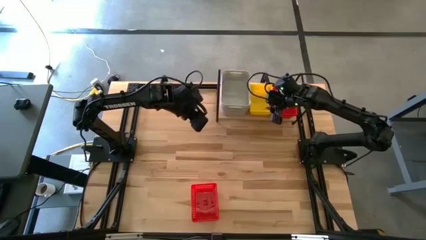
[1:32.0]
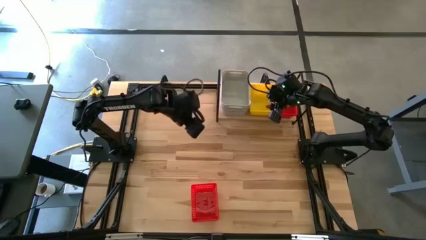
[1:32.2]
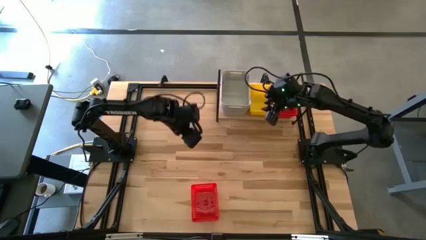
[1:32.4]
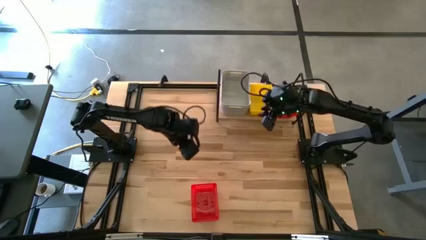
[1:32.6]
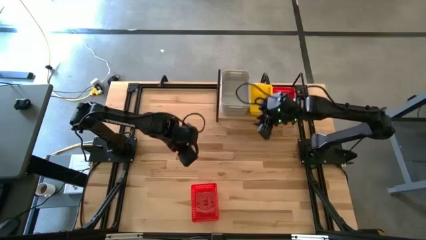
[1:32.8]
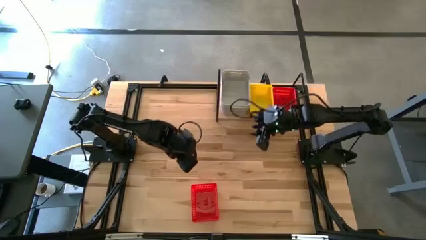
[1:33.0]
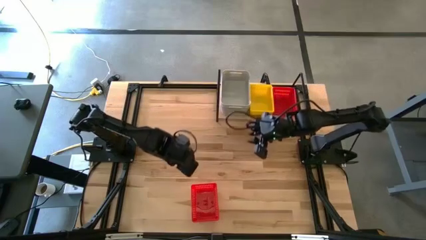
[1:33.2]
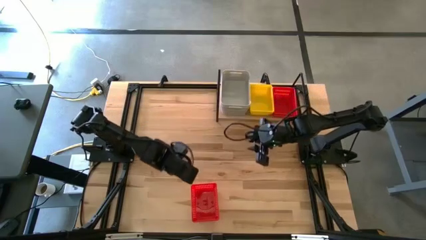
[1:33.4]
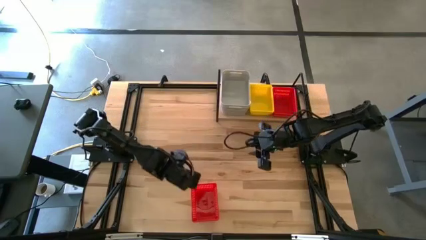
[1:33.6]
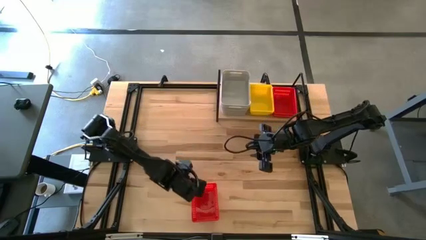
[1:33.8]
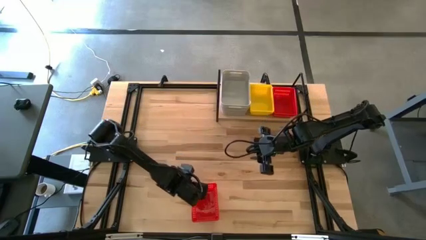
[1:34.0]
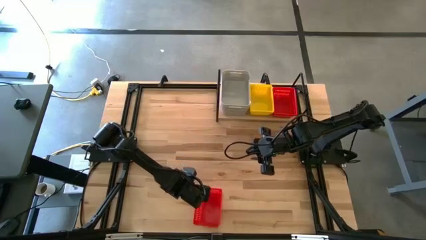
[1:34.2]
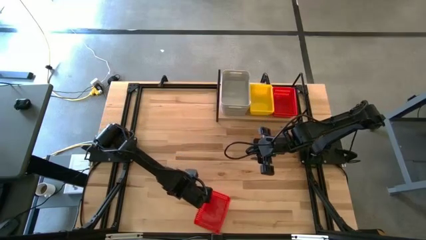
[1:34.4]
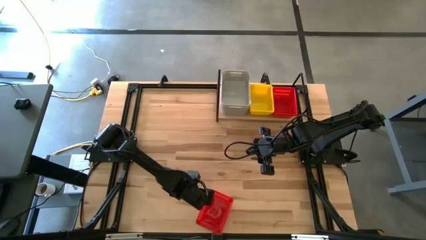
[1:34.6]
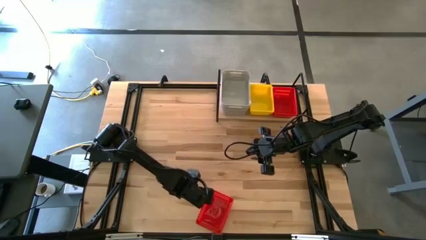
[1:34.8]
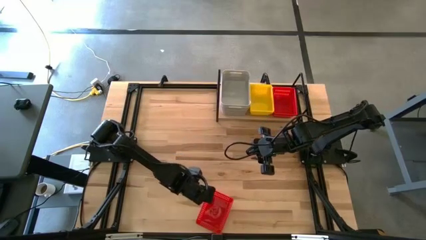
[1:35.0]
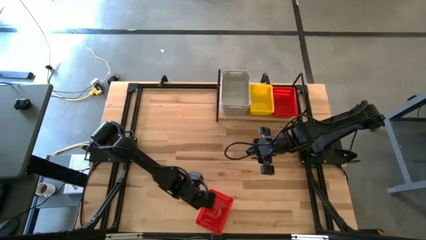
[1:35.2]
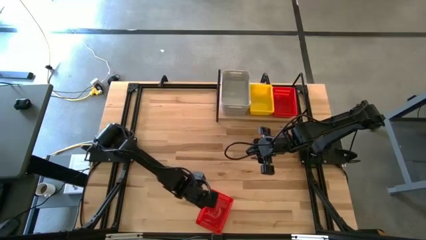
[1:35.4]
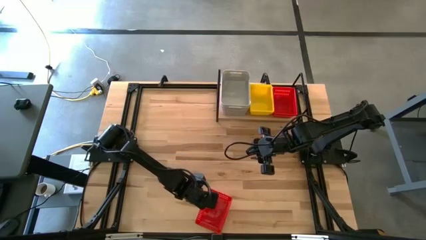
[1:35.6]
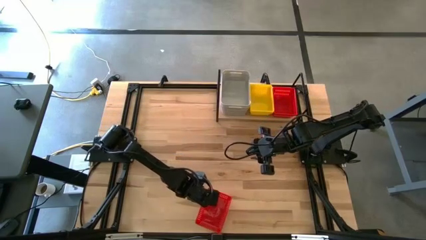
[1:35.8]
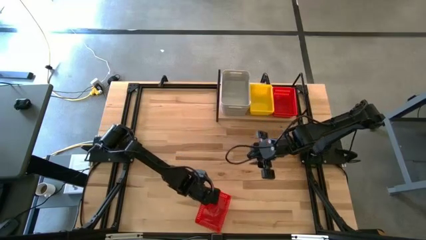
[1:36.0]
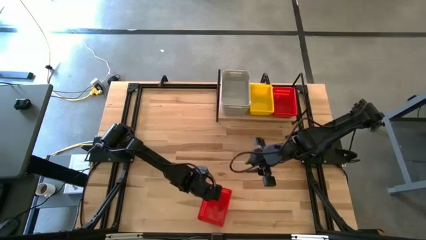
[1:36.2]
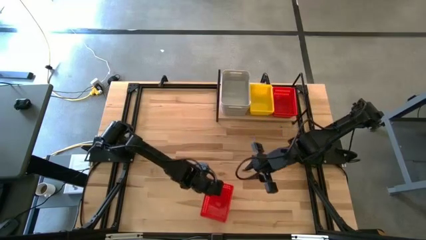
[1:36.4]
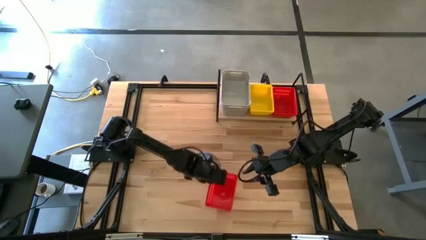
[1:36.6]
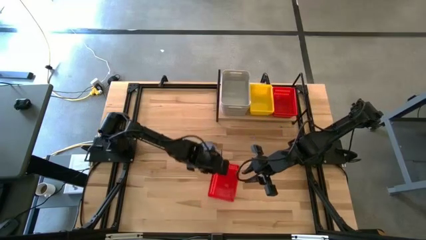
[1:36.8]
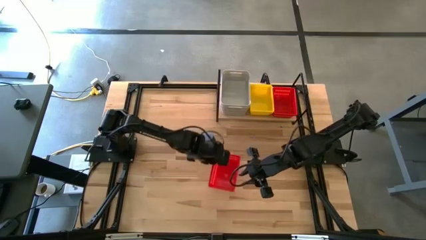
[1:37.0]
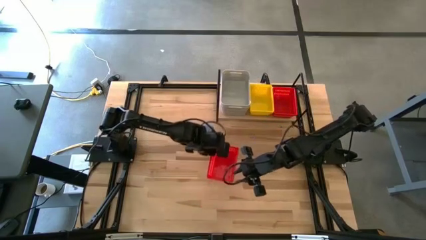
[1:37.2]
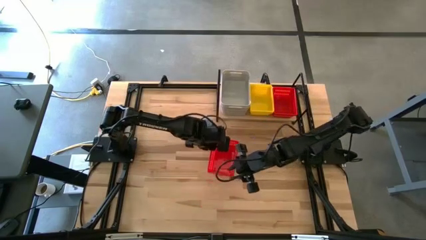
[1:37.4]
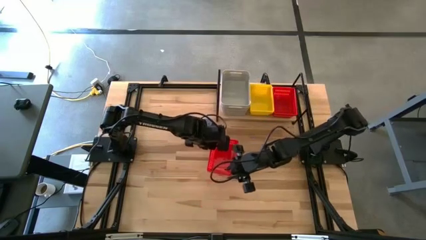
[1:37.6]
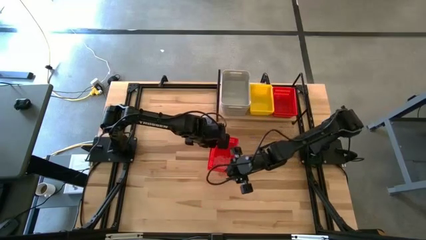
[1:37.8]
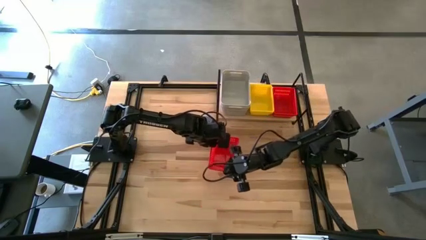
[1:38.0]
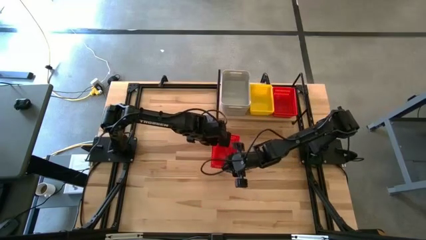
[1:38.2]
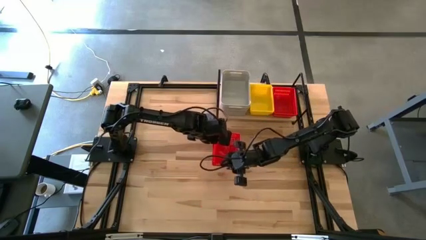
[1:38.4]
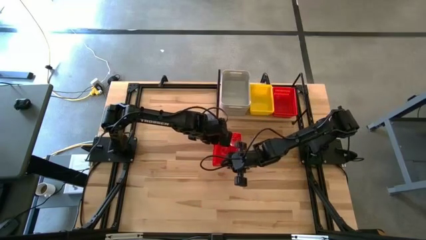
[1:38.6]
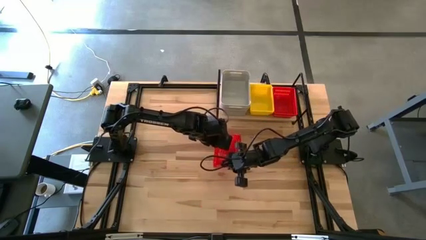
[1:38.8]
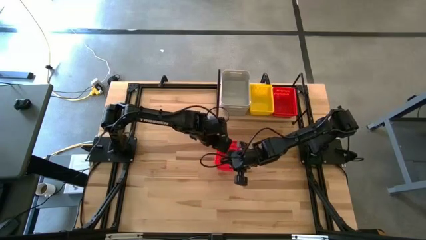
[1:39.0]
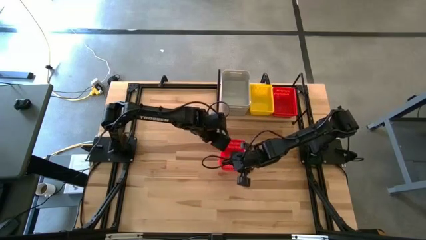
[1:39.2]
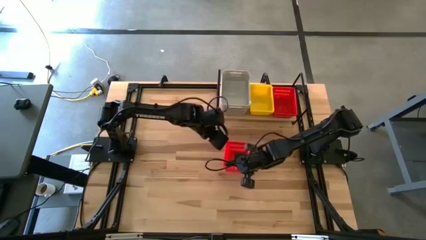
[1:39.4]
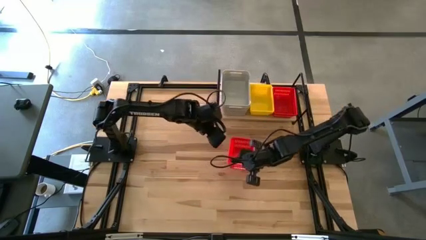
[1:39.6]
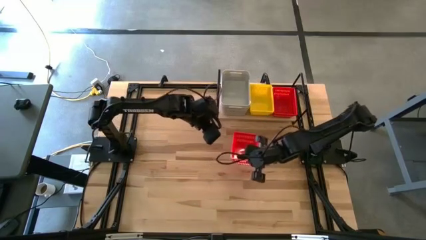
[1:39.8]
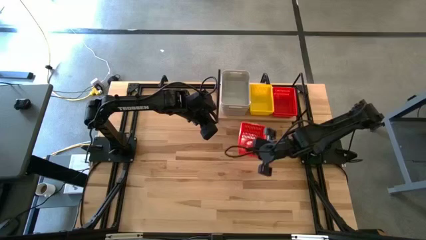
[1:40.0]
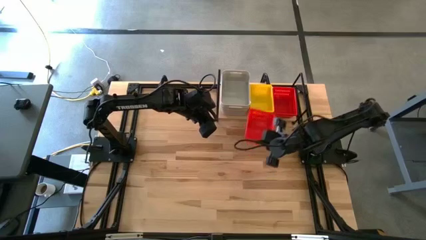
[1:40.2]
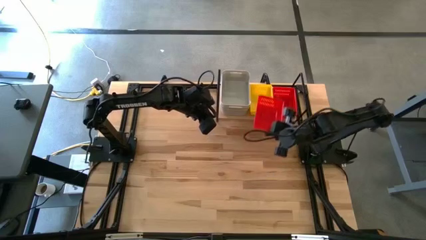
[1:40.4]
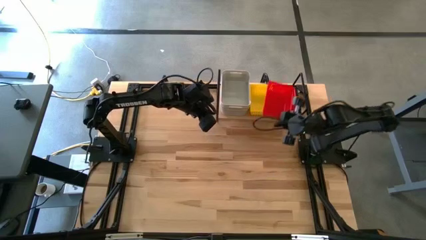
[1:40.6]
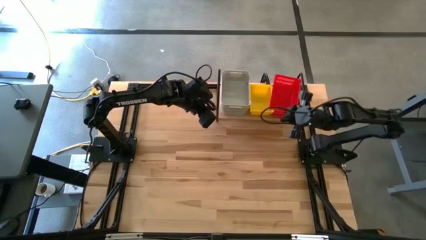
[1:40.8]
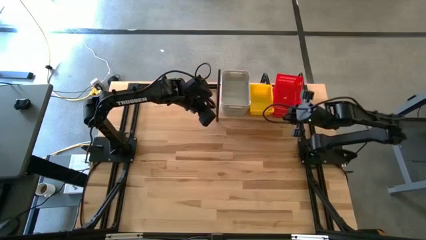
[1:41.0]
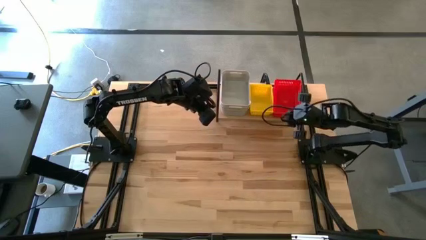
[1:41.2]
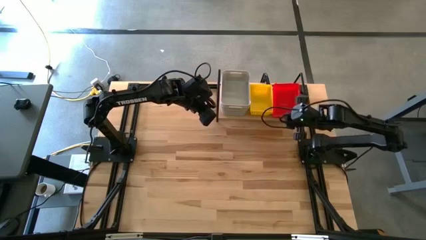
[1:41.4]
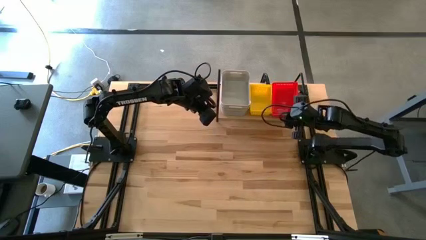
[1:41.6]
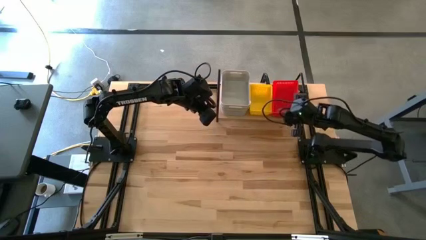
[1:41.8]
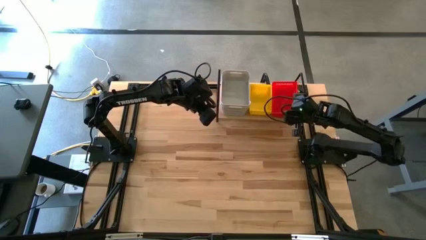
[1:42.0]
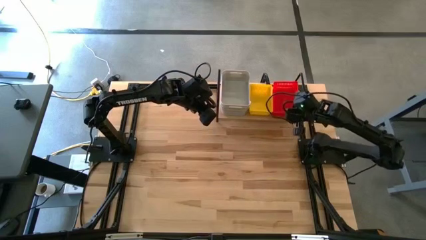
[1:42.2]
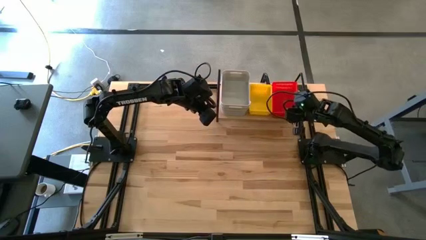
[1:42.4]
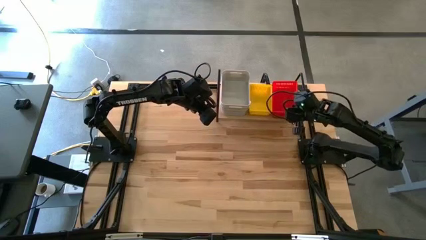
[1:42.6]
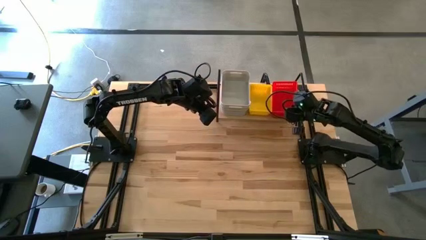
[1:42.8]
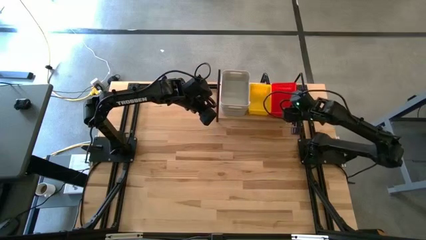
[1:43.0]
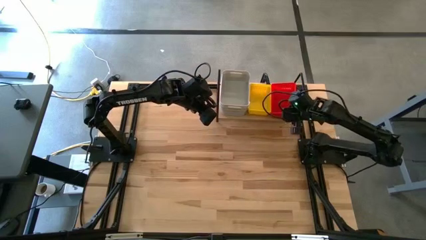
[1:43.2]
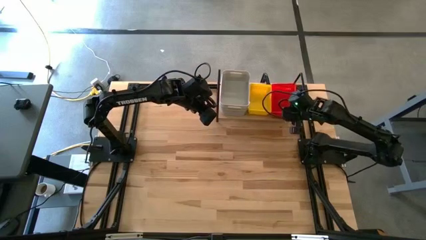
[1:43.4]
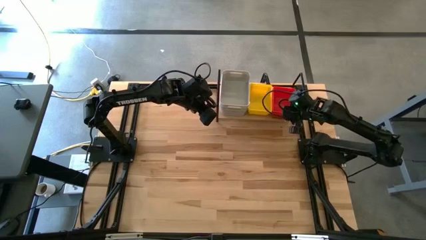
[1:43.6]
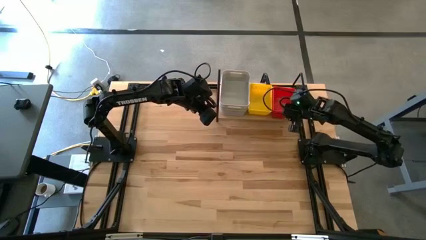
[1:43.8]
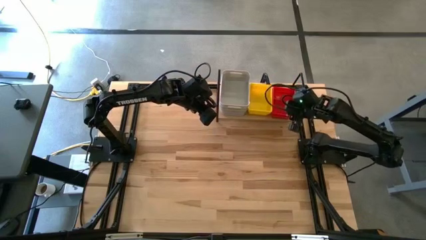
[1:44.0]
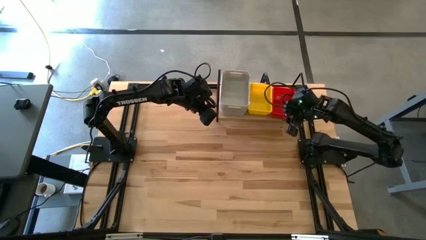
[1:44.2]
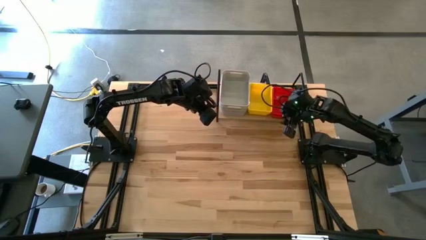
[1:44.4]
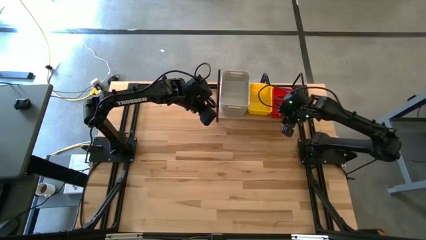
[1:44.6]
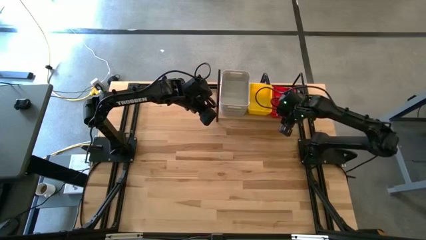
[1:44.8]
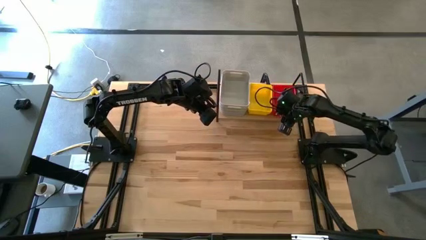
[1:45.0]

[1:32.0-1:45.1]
Task: Stack baskets on shelf by color
Stack the red bin on top of the red bin on the shelf

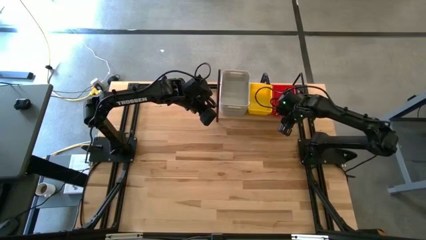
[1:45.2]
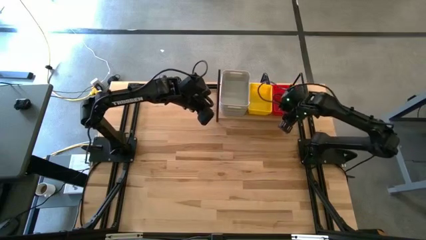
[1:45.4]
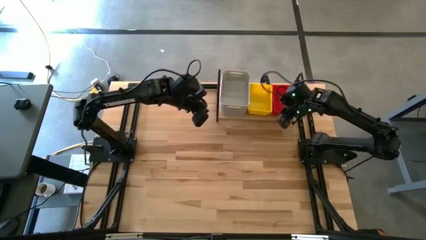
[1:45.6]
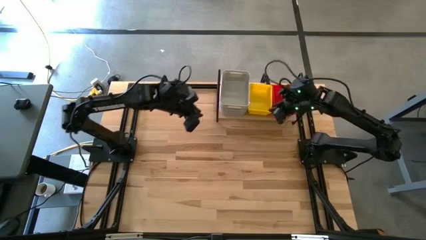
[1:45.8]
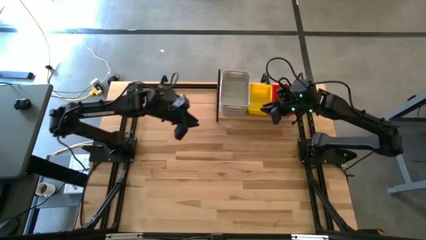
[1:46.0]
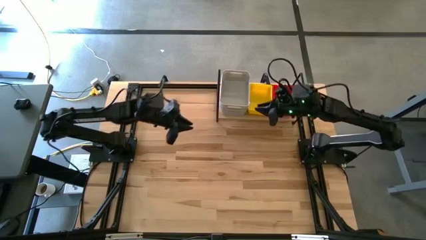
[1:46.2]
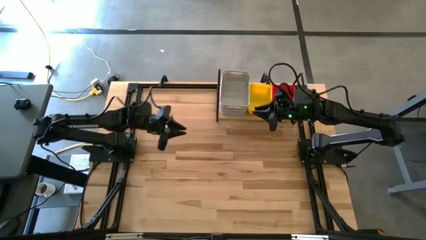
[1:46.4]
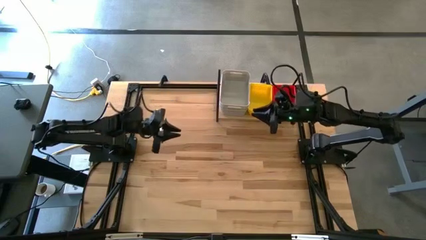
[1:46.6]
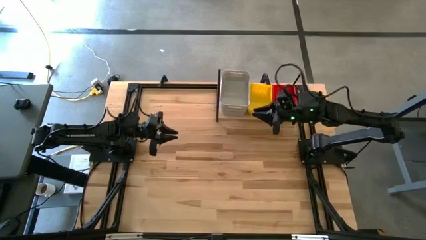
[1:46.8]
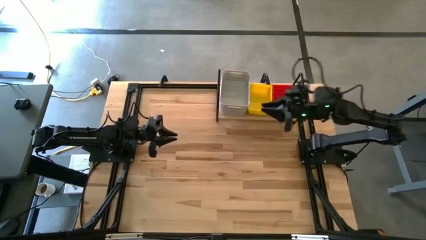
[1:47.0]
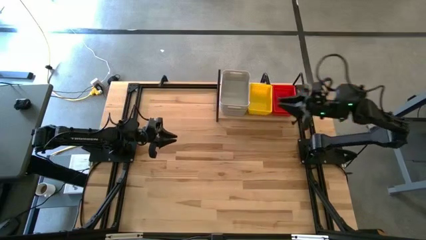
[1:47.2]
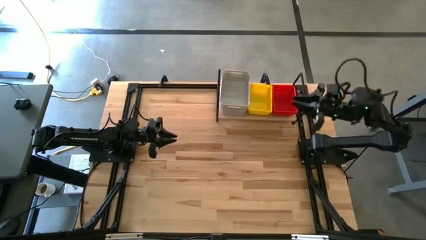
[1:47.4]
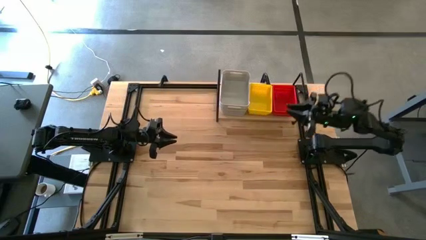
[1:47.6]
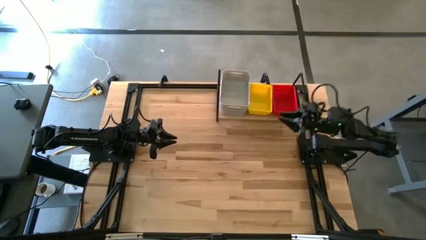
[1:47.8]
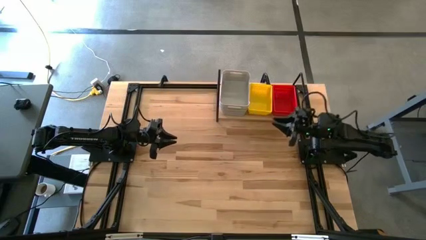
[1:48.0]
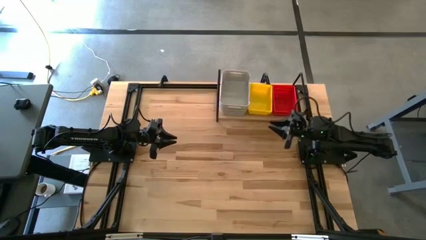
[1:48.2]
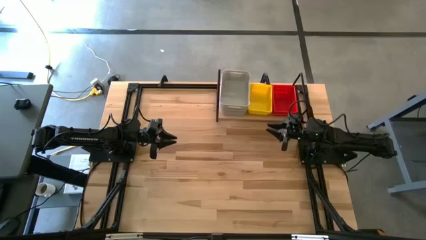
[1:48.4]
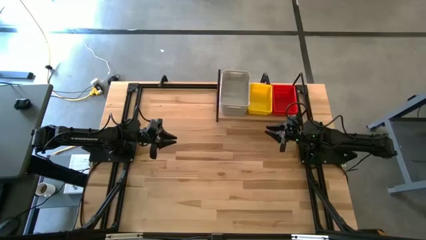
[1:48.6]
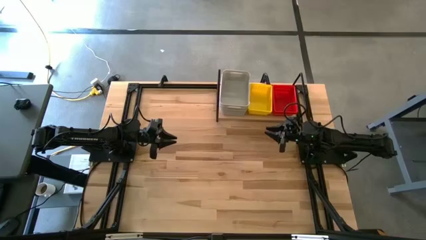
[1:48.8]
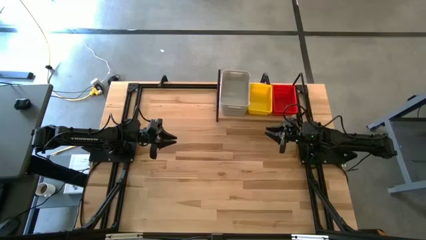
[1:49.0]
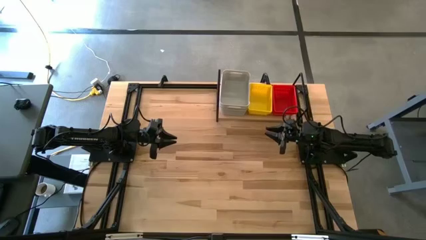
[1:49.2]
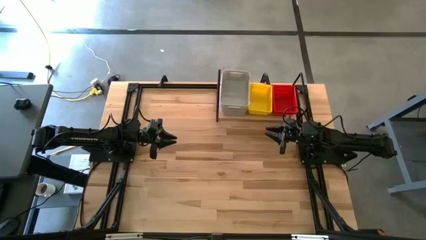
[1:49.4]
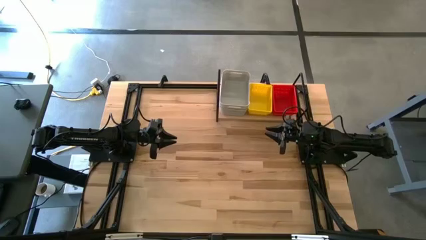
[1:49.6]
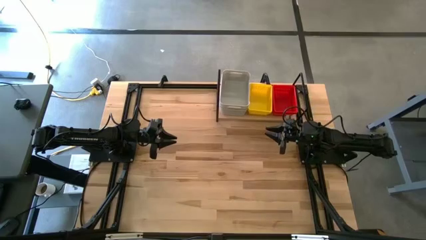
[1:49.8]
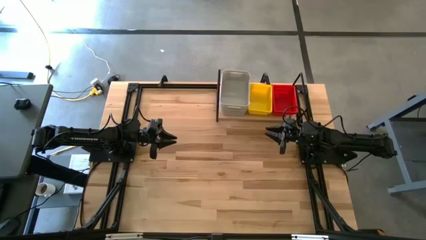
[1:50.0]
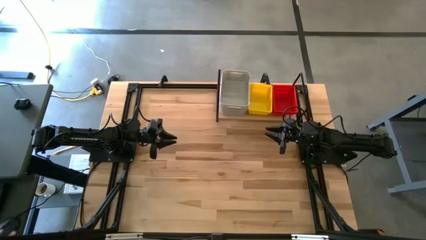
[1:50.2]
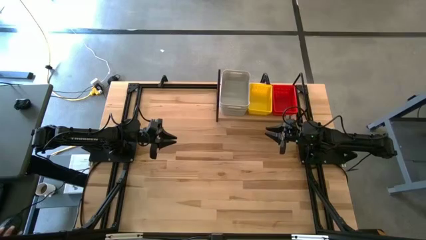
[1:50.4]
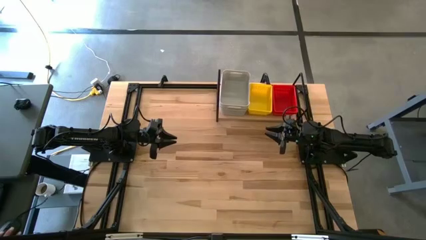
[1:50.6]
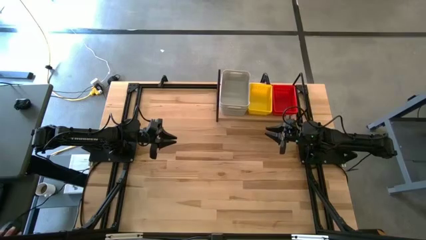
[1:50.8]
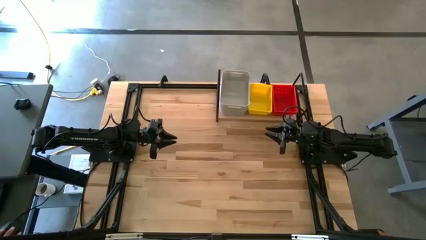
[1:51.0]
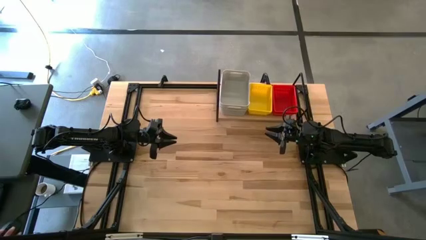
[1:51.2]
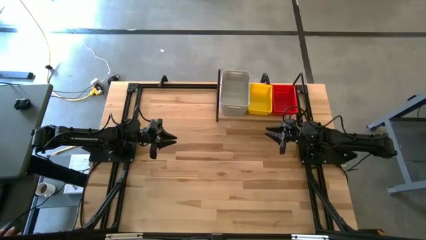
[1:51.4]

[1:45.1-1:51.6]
Return to Home Position
